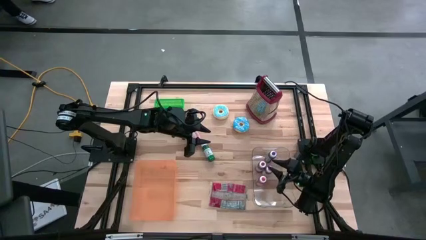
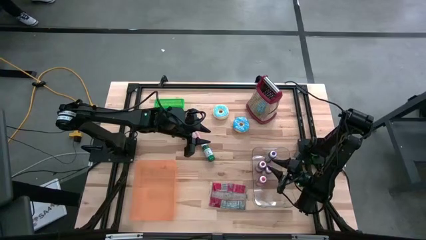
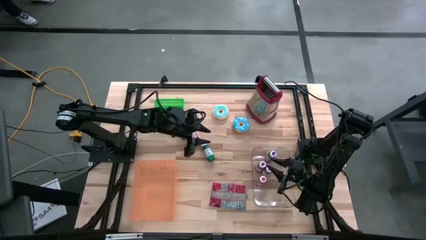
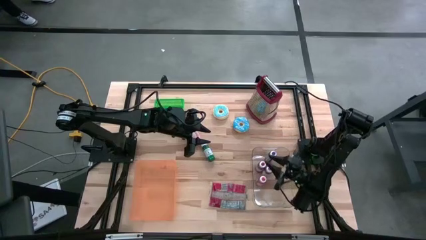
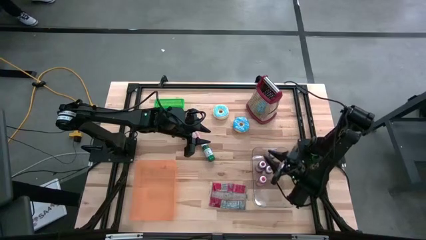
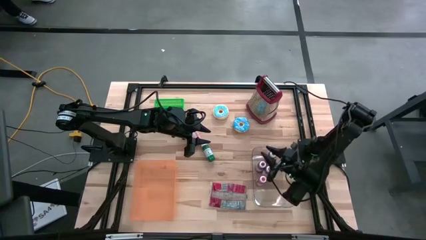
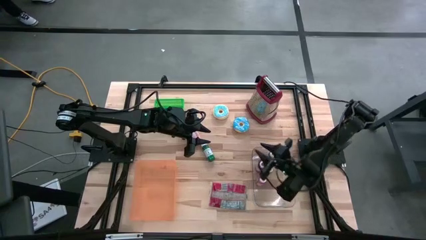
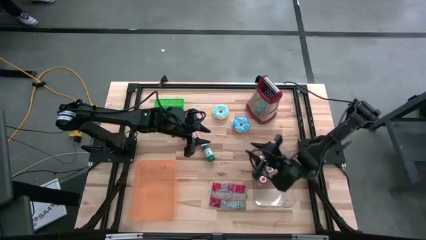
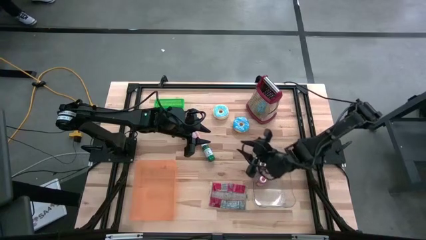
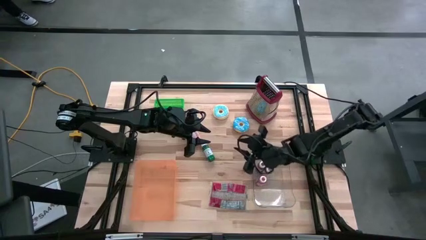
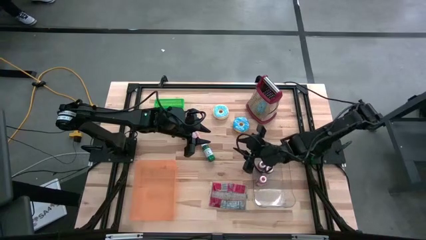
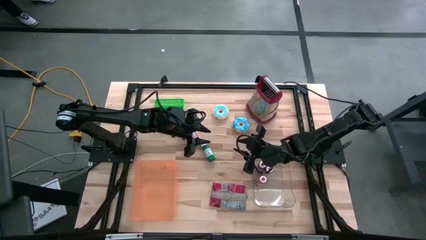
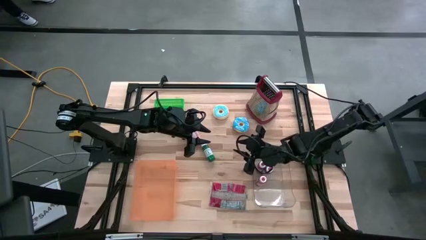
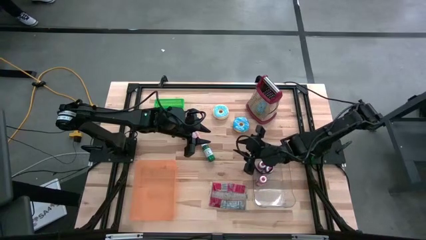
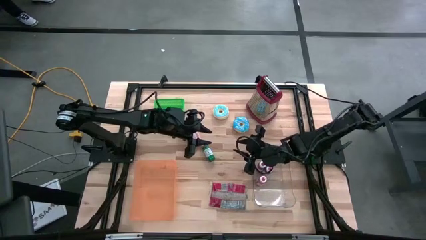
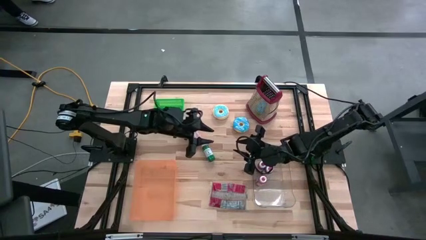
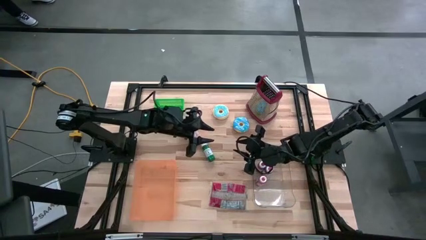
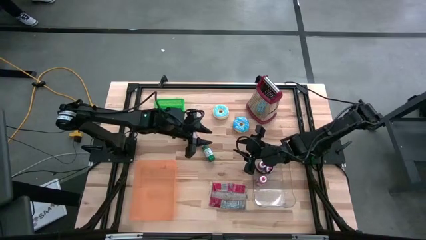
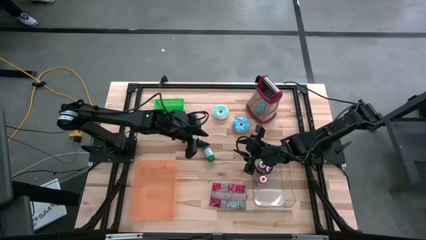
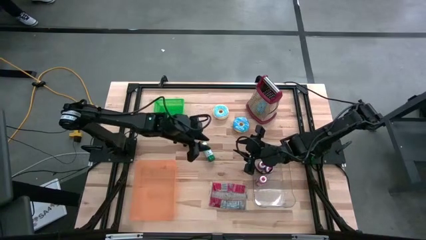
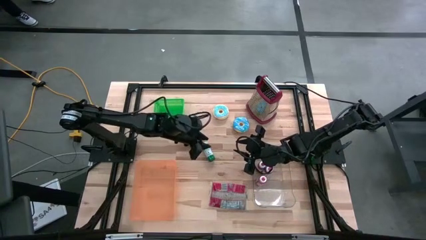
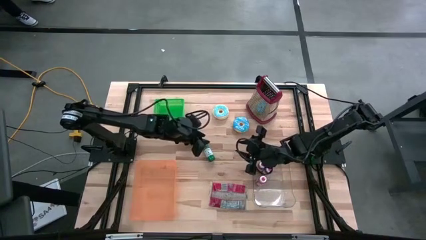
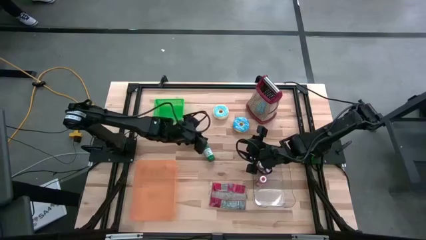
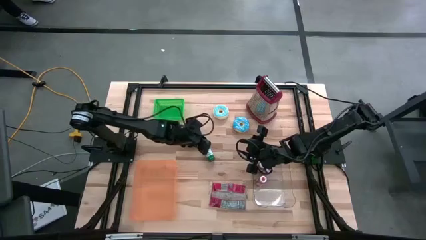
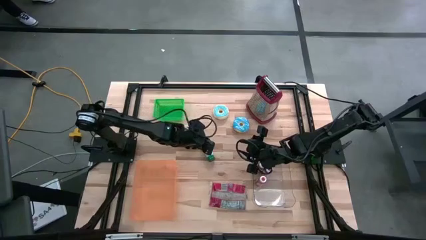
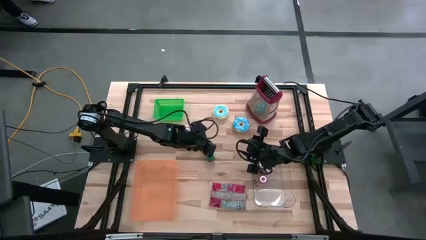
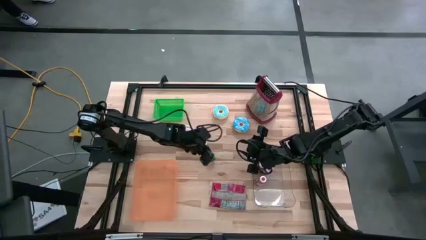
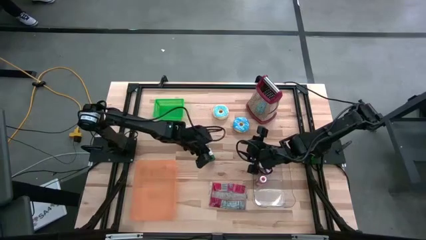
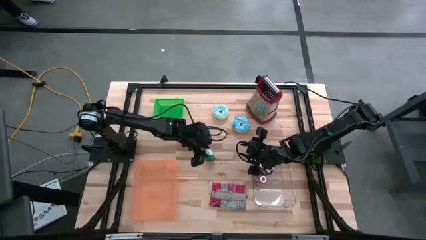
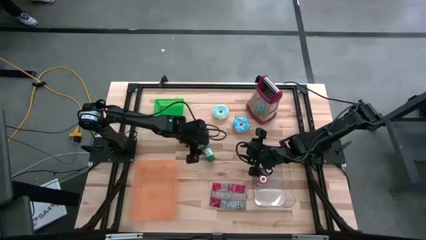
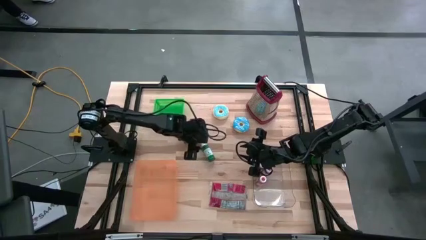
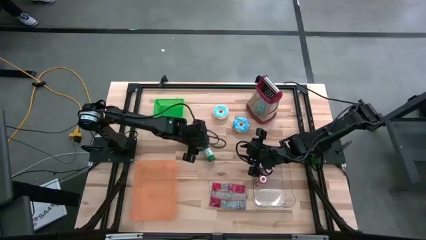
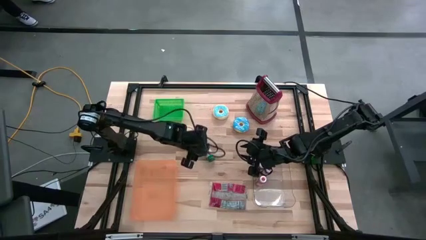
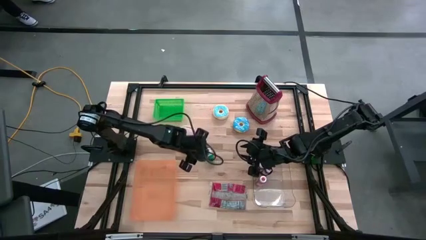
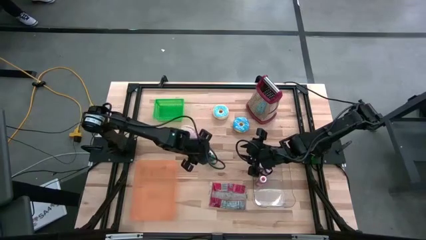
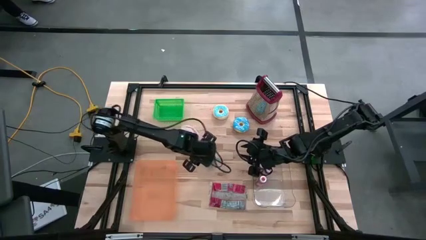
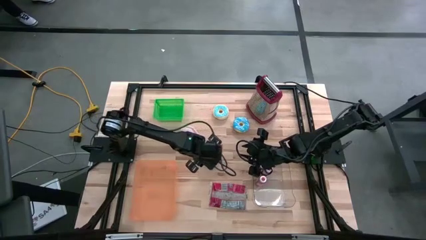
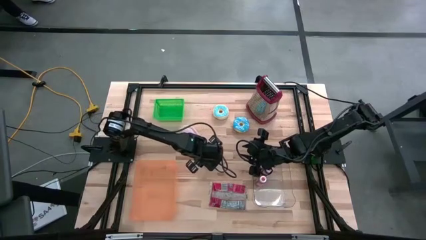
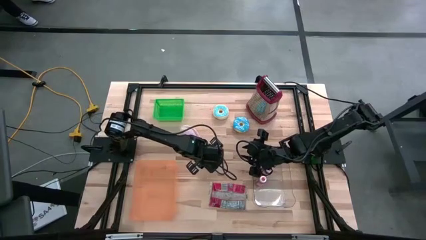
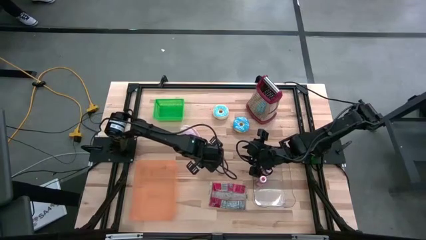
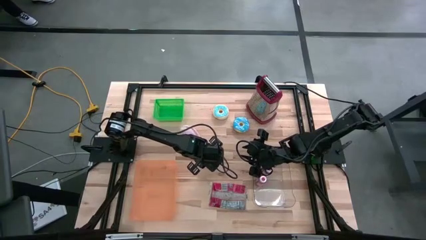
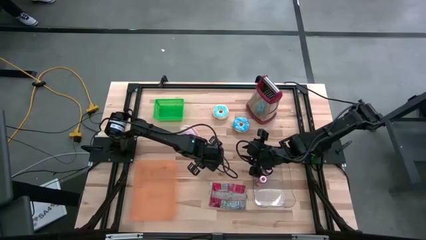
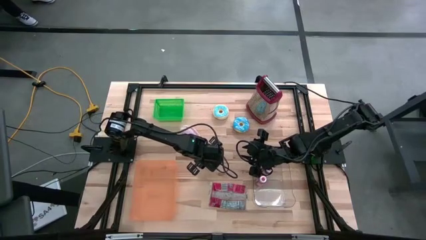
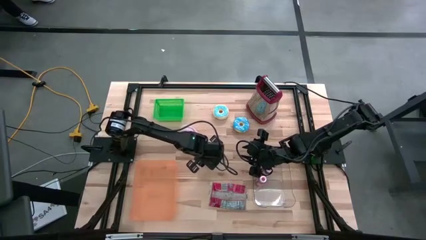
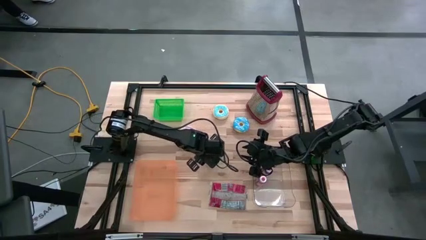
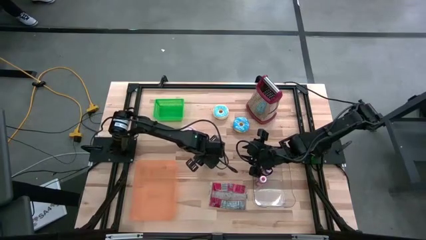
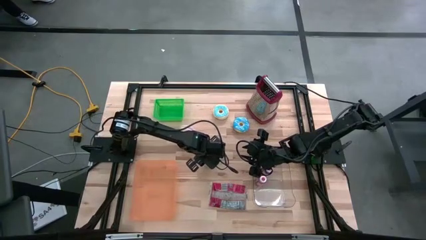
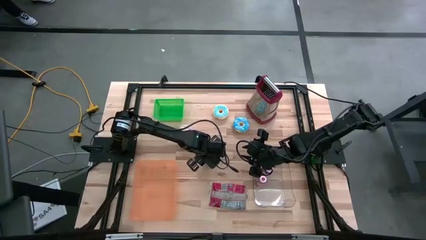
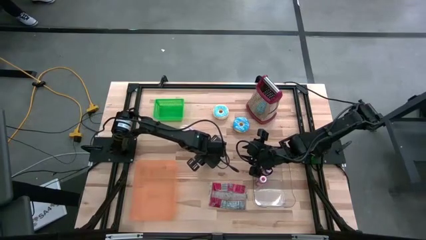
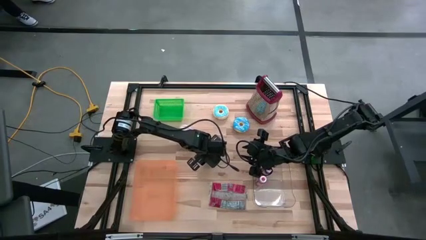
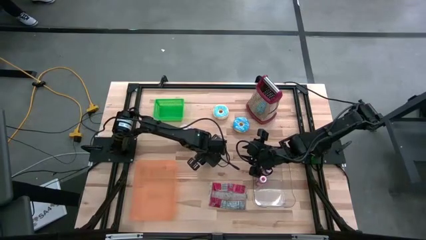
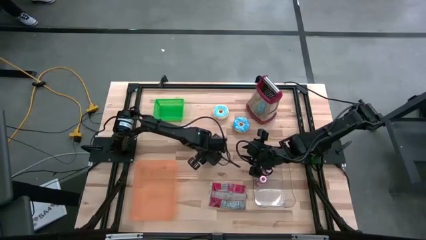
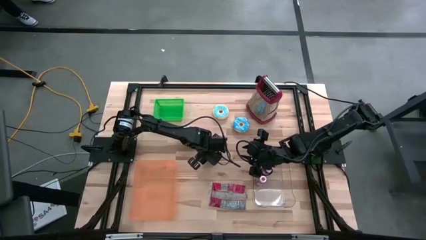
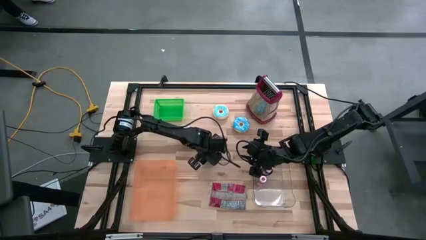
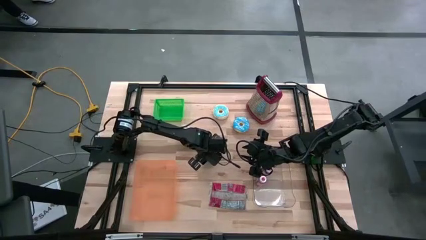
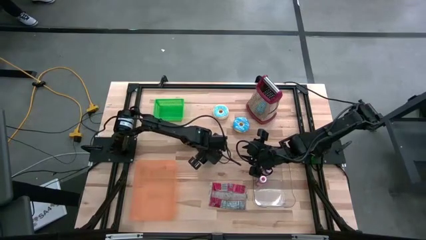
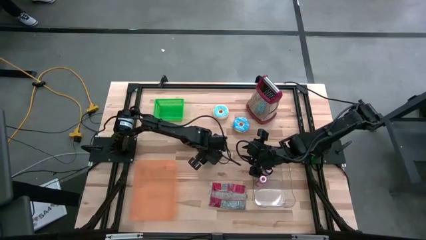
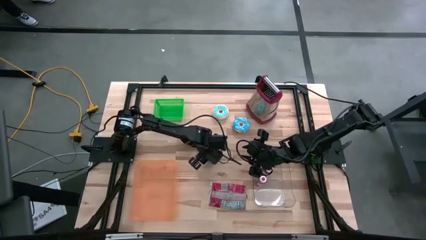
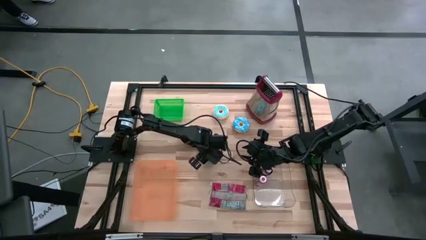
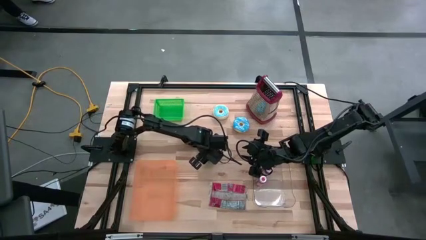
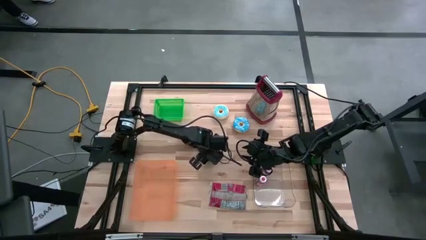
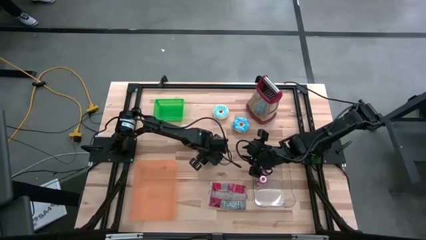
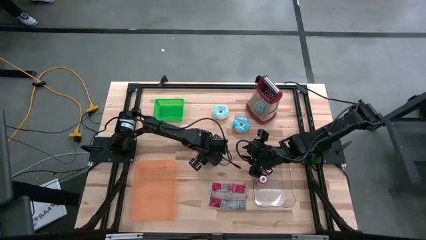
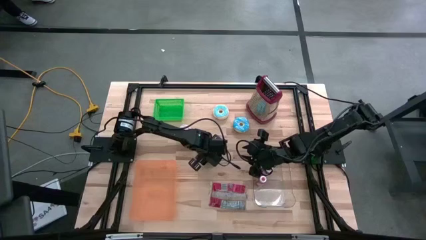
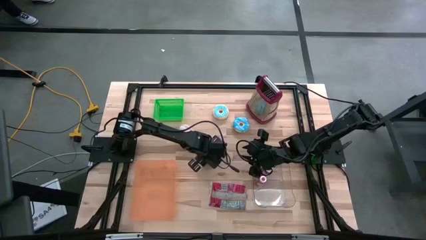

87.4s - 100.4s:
Put the green paint bottle into the transparent bin

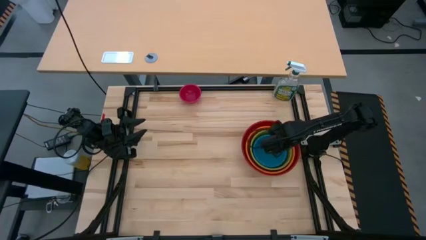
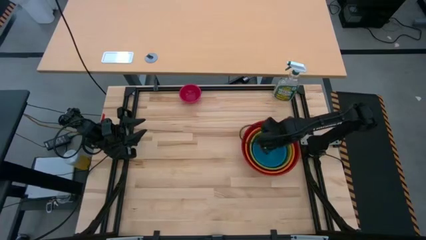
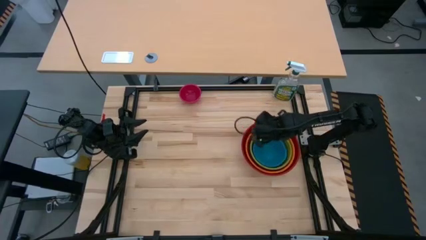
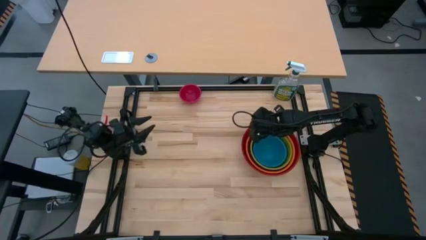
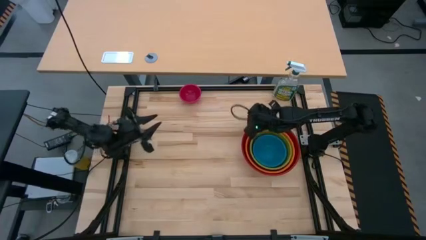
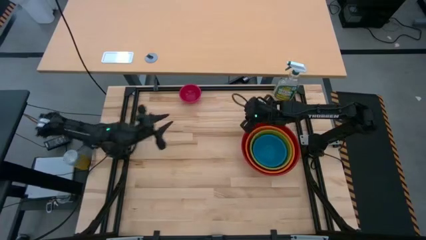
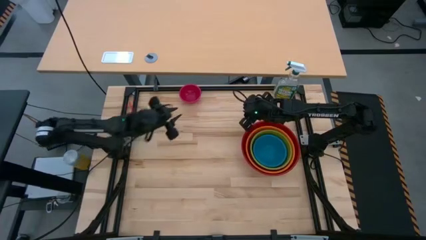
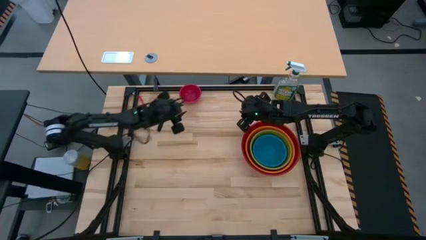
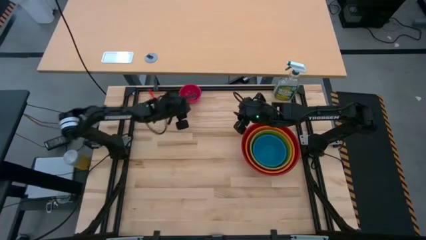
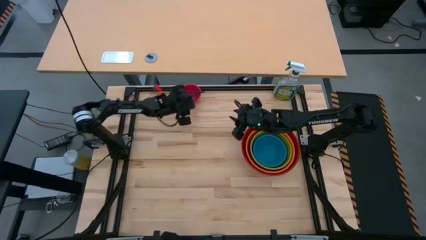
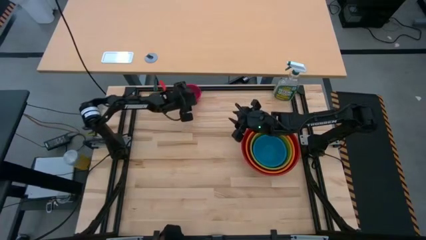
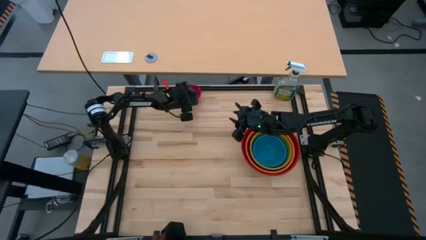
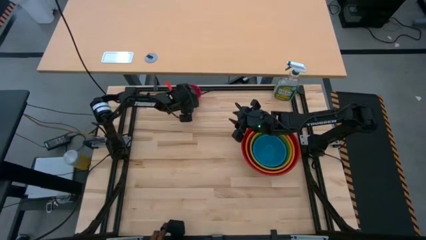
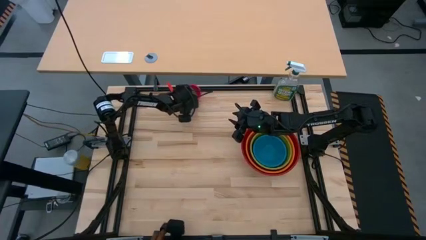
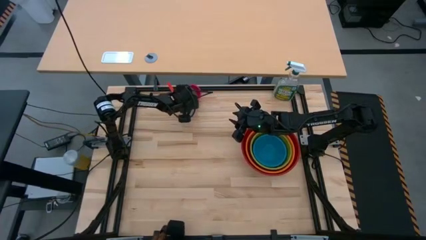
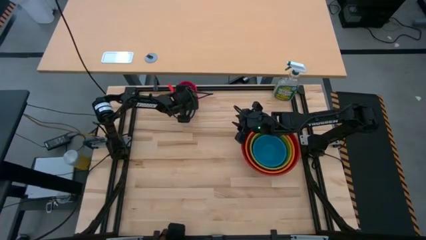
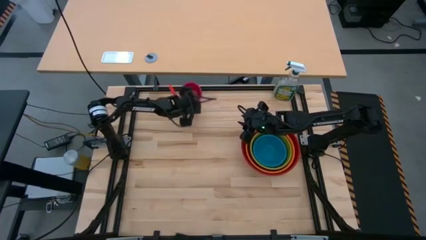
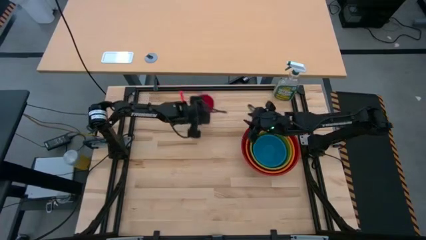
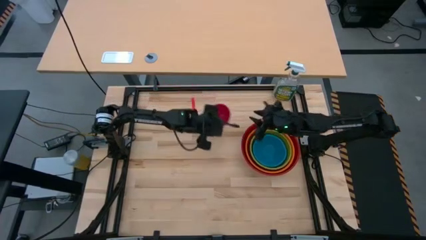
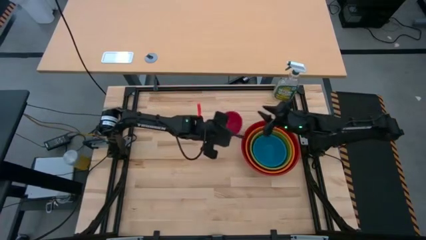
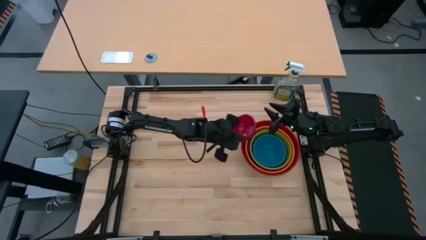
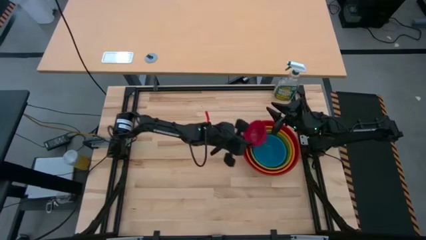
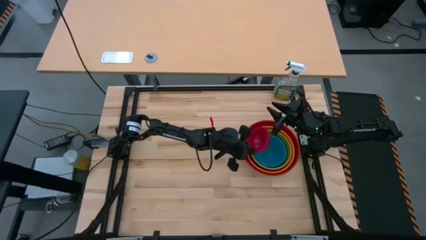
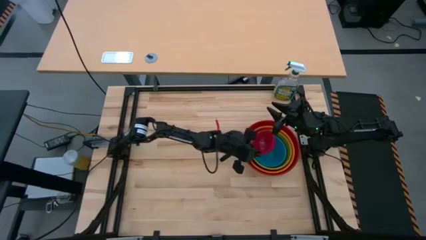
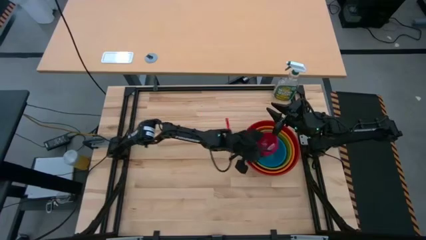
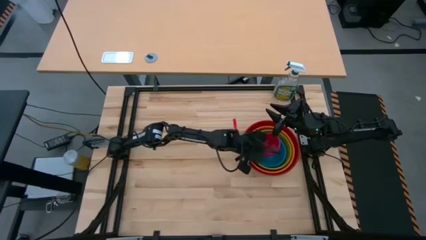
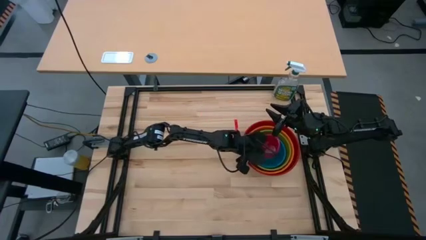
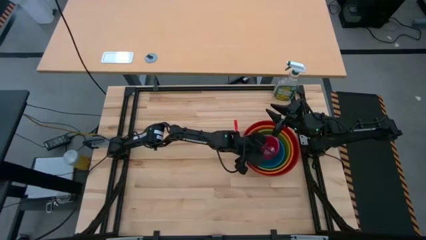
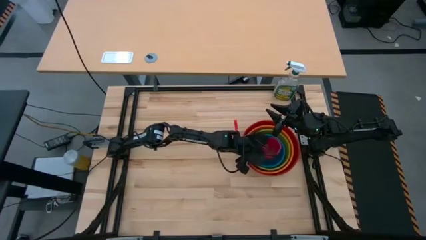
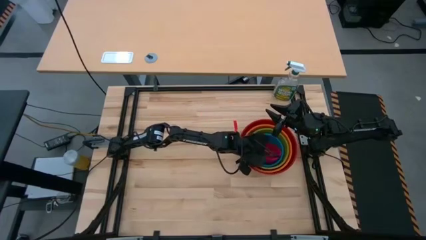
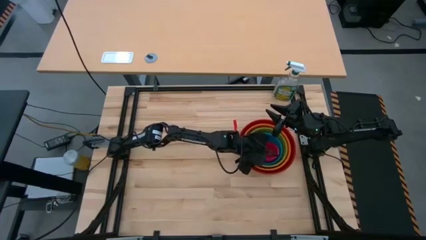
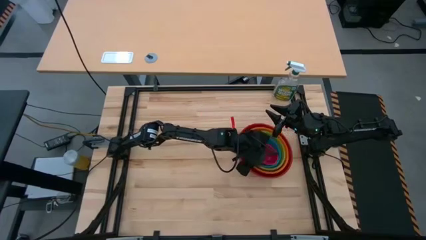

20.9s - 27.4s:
Stack the pink bowl on the blue bowl
